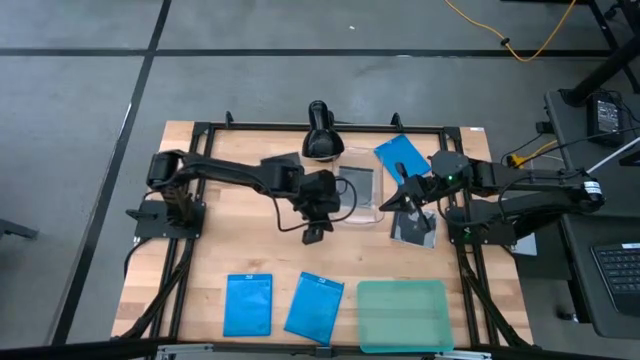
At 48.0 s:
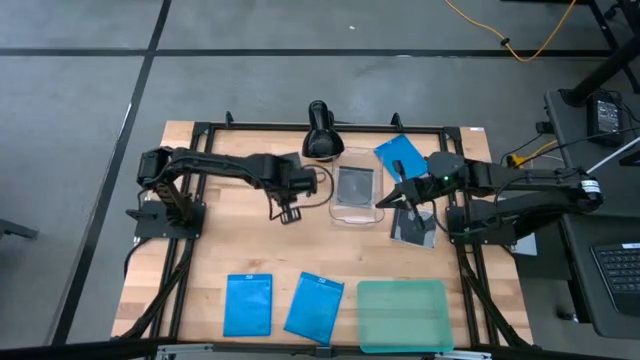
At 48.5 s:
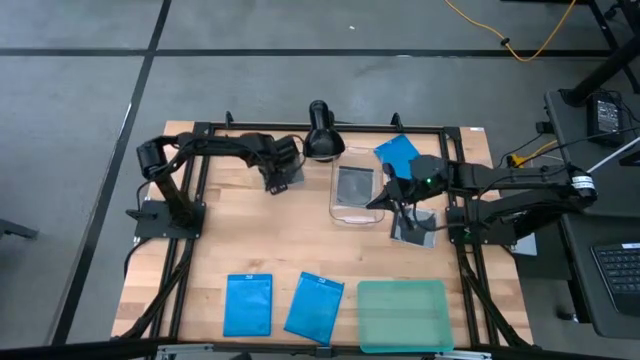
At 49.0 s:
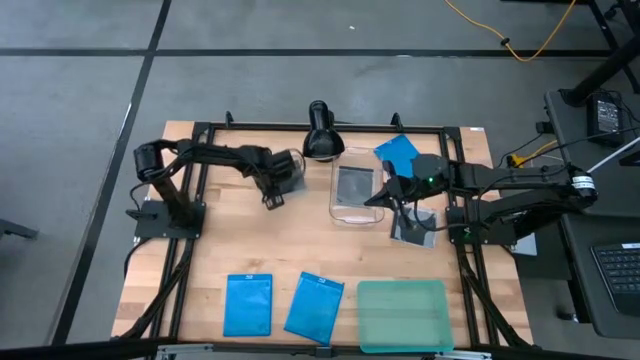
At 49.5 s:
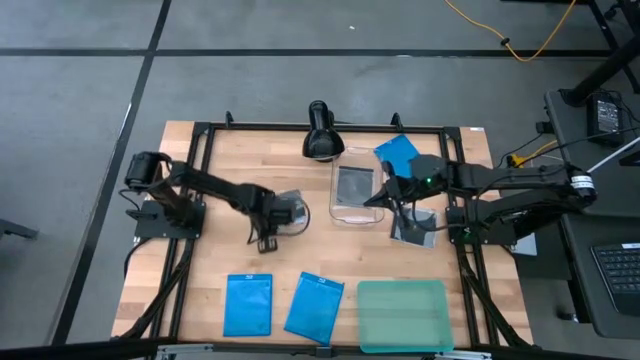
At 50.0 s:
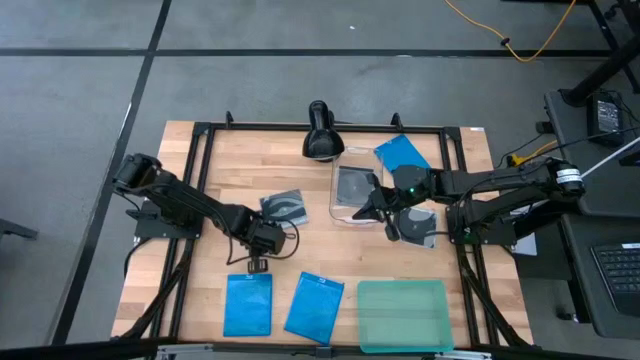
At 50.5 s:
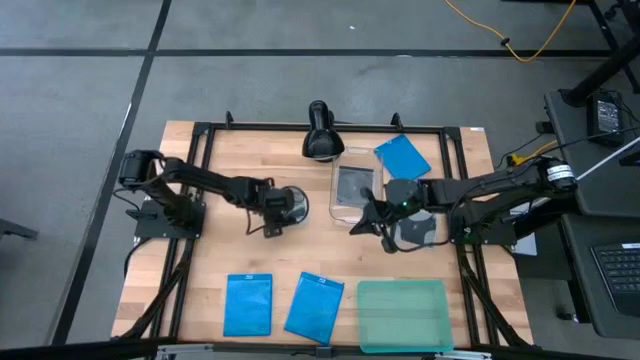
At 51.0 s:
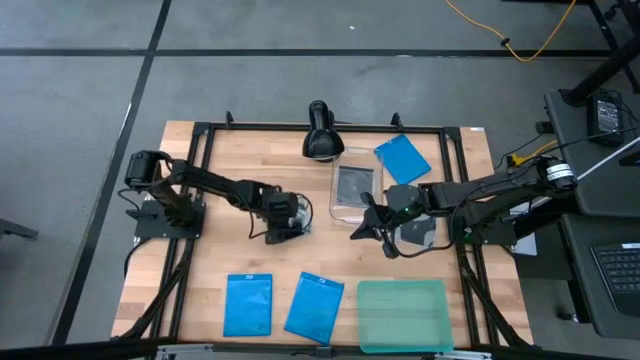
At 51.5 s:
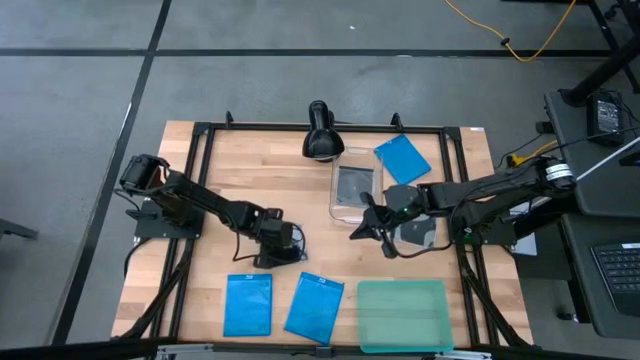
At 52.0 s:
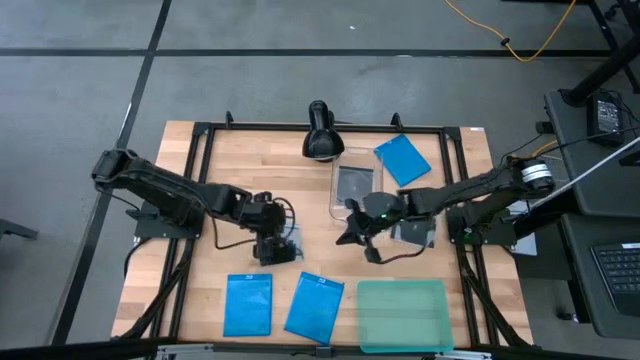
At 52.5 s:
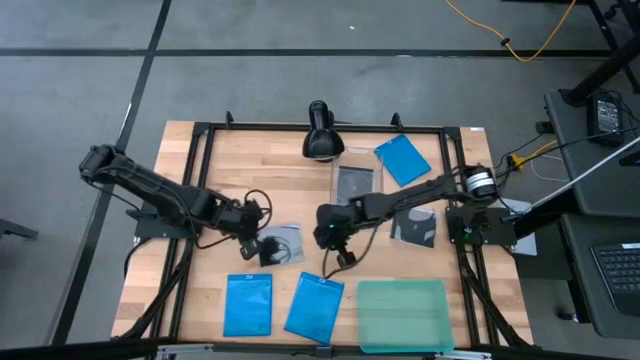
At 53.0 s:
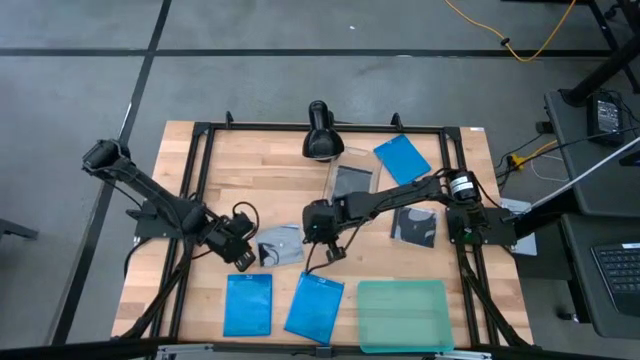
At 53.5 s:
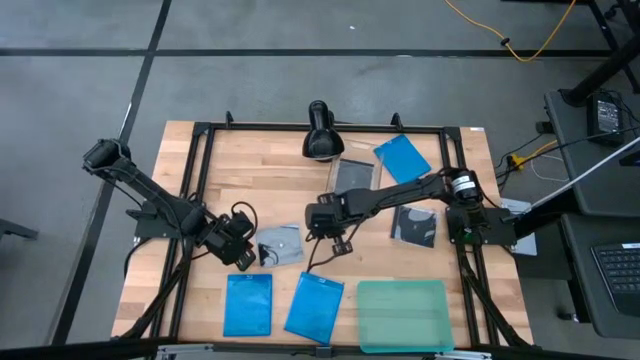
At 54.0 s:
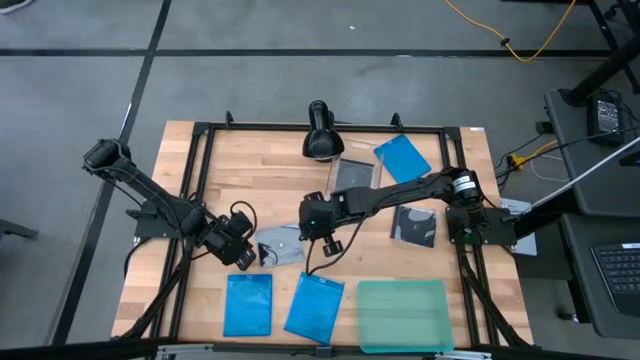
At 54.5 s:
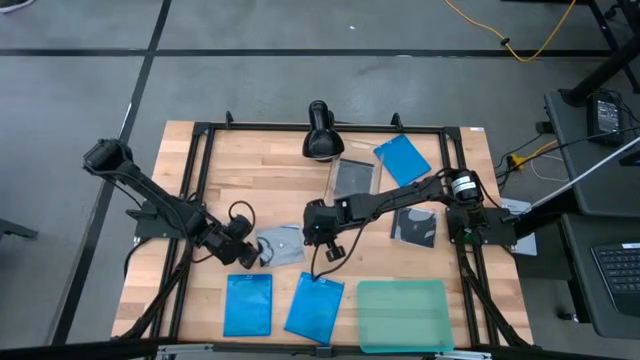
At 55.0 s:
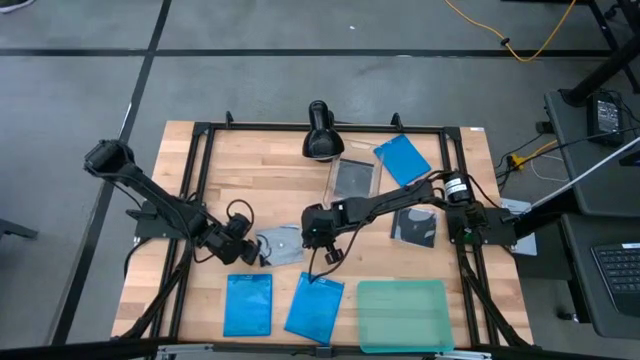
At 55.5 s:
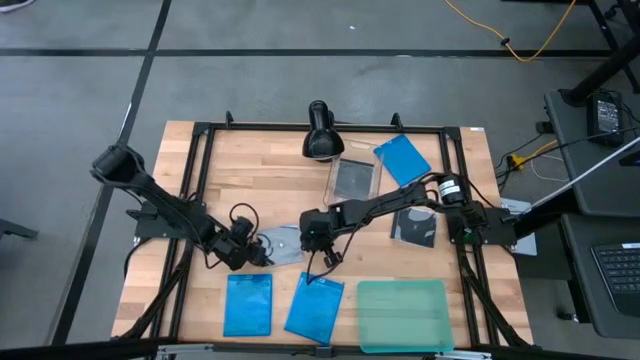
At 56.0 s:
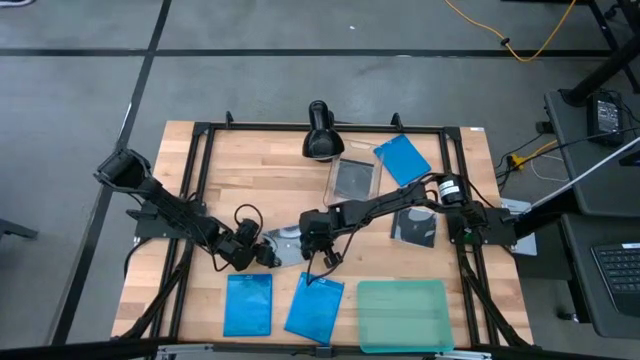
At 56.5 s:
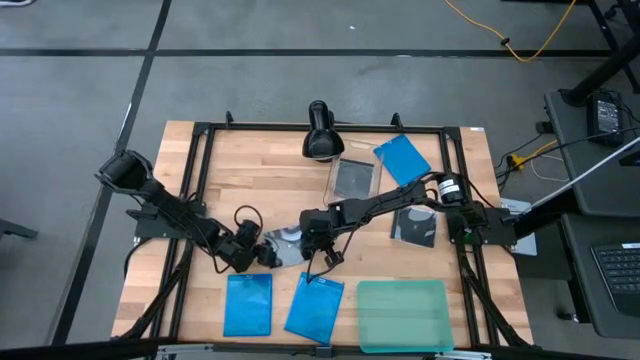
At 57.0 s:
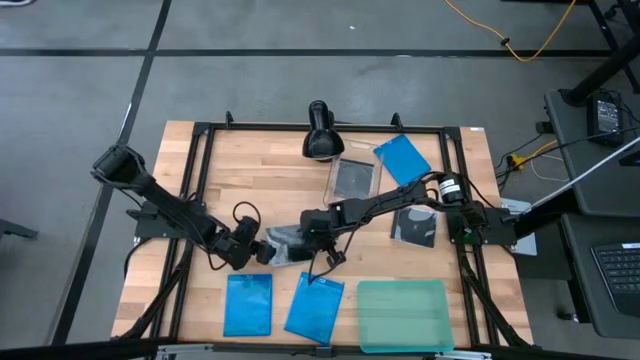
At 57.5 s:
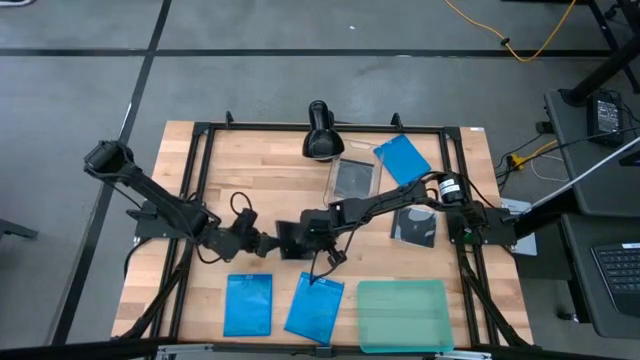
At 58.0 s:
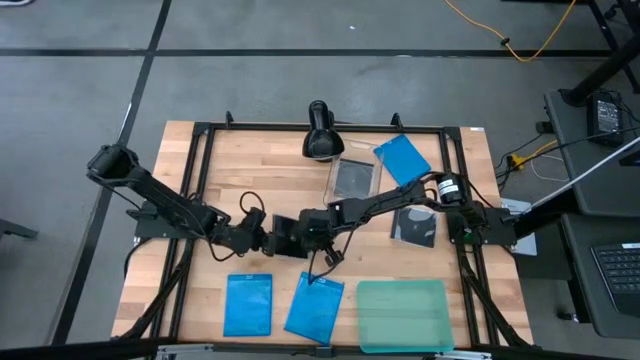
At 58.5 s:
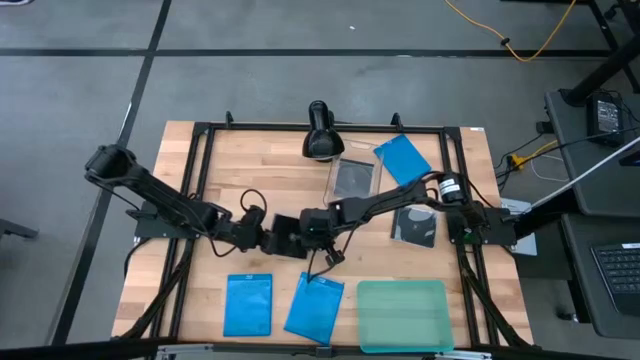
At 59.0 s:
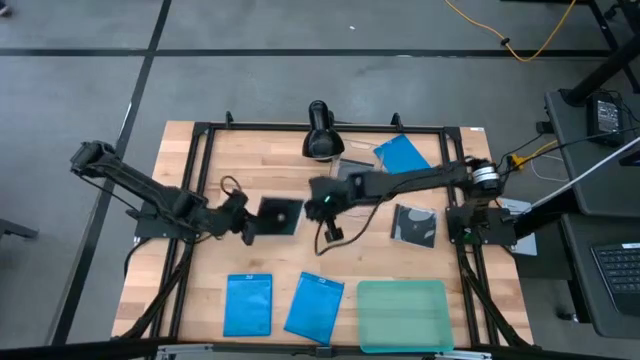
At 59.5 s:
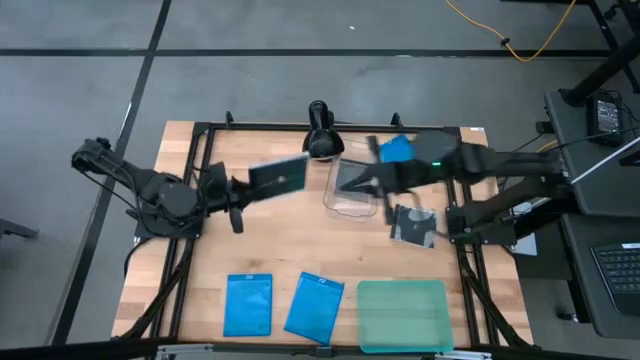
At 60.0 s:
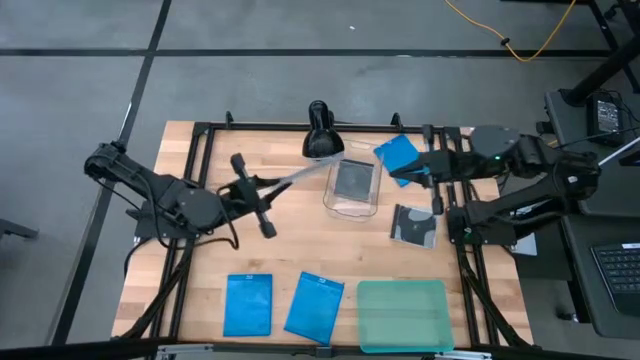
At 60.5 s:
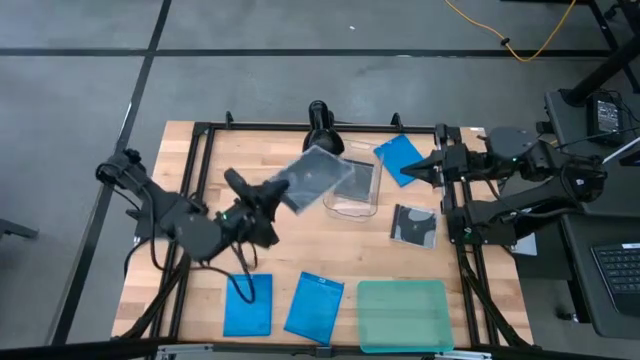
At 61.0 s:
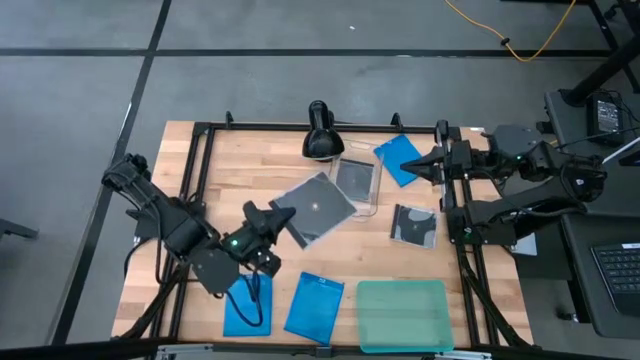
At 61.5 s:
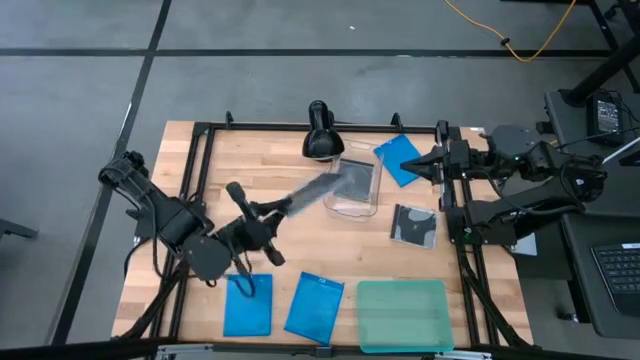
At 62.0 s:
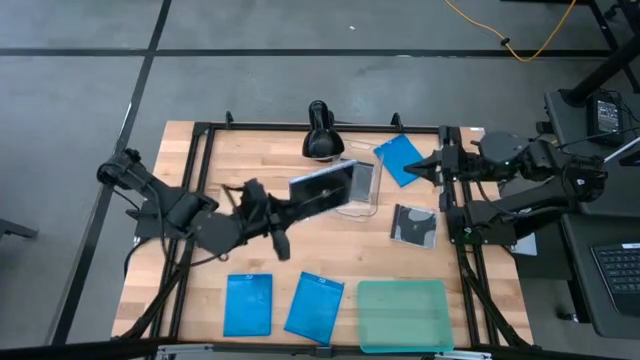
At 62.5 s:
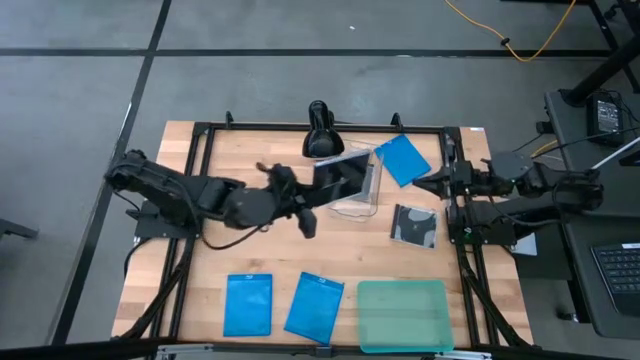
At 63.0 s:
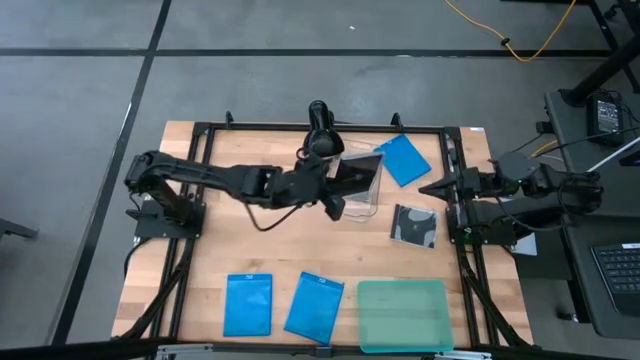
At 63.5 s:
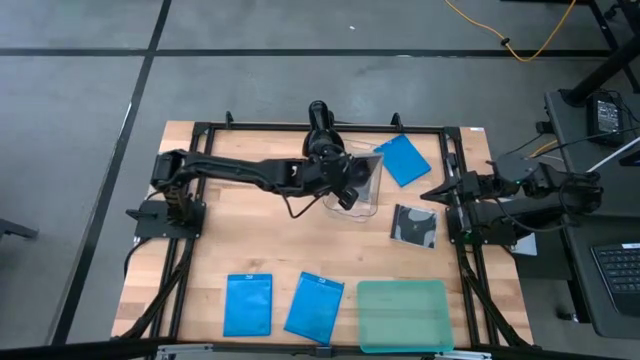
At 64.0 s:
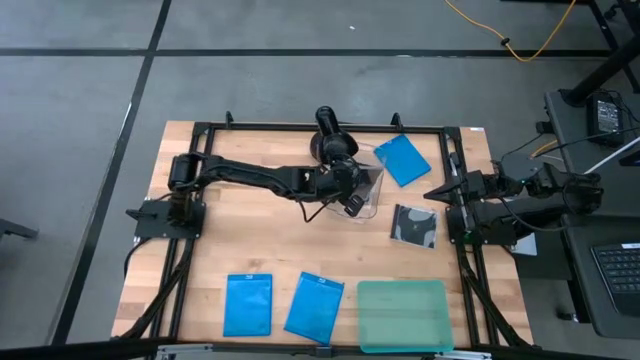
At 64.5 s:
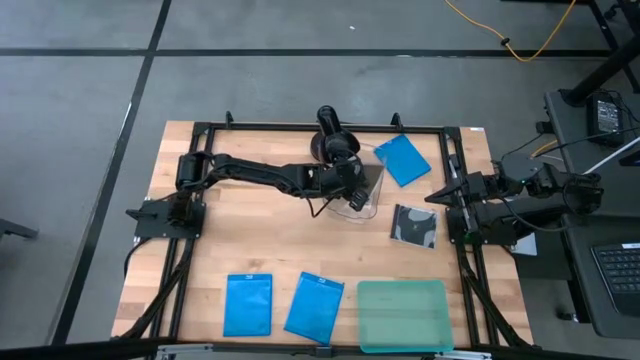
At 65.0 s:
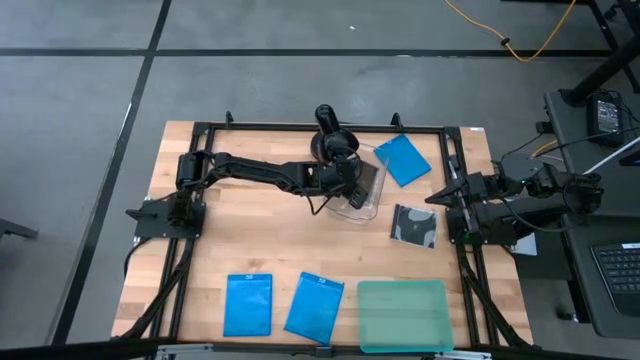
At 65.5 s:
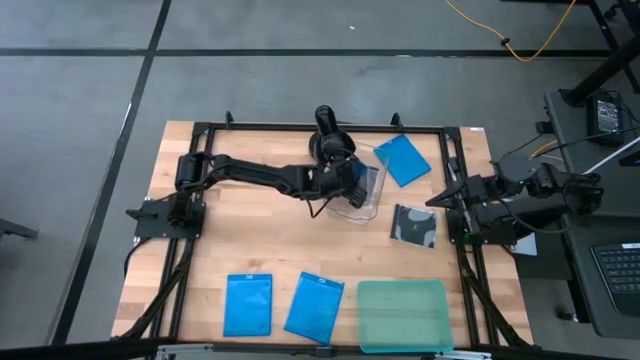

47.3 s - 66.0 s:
Task: Pick & place jewel cases by type
Put the left black CD case into the transparent bin

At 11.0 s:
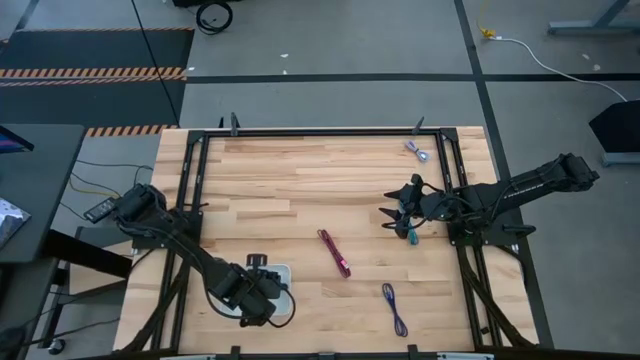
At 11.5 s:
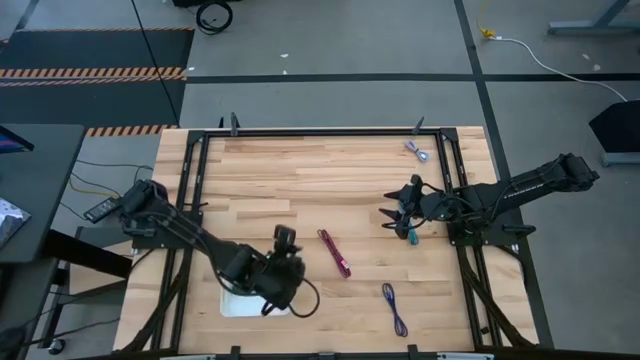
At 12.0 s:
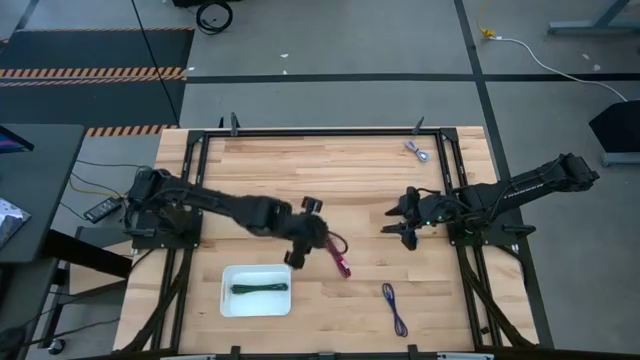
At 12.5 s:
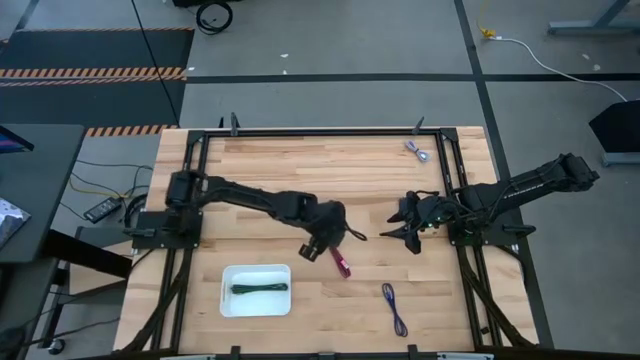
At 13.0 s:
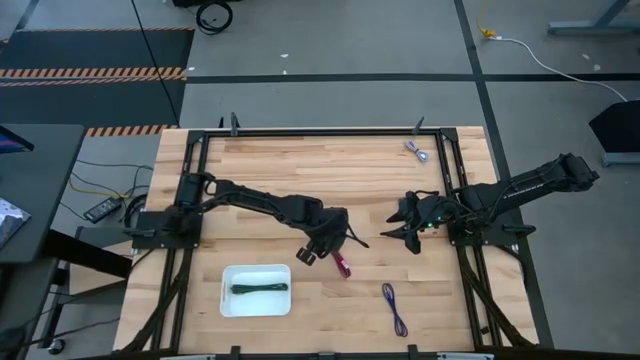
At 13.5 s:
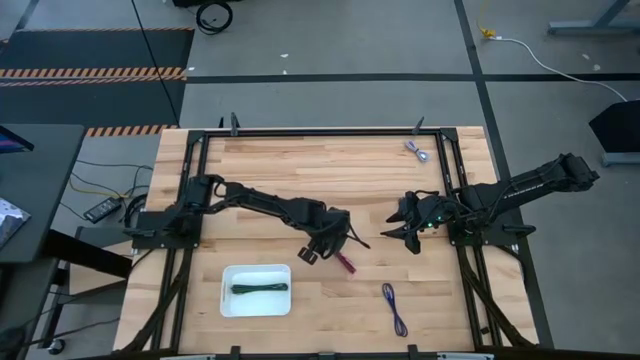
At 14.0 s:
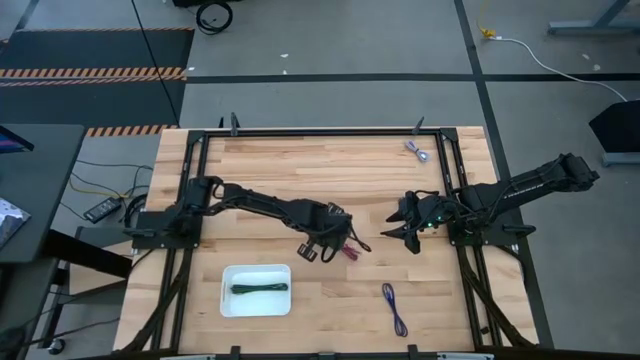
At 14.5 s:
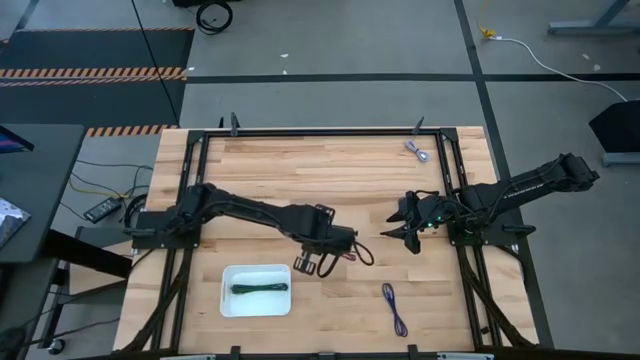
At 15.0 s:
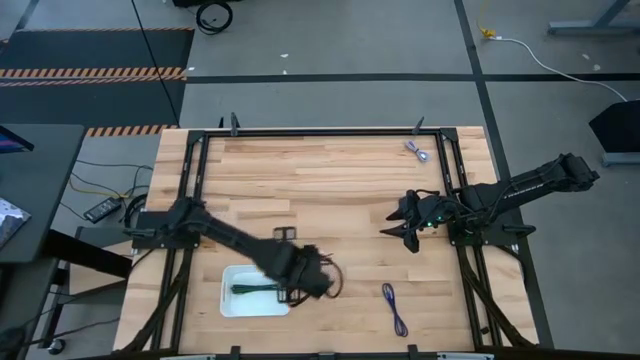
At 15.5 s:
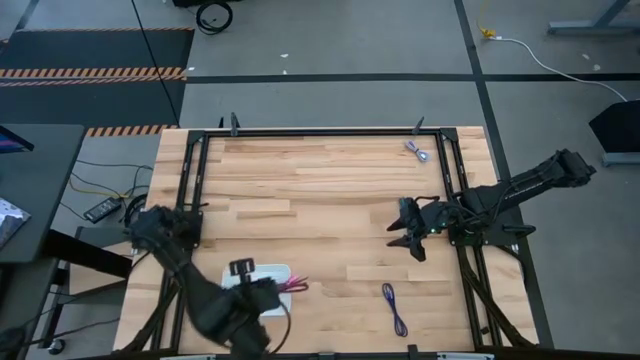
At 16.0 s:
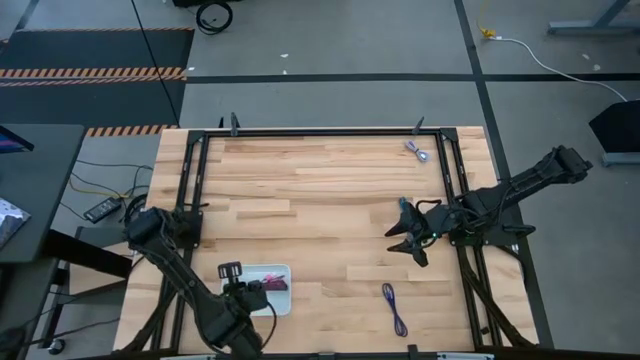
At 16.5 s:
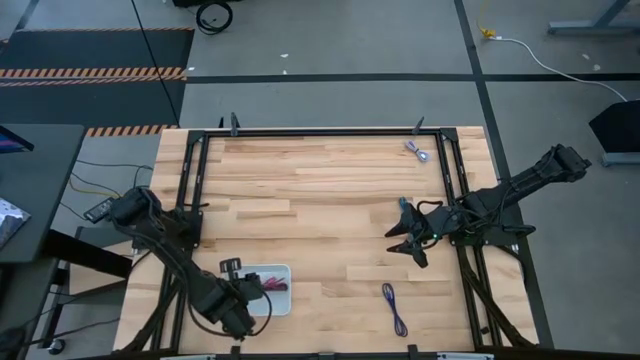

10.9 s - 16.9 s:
Task: Pick and place USB-C Cables
Put the pink charger cable into the white bin
